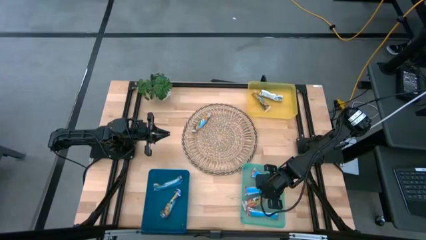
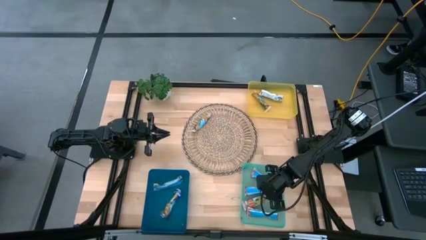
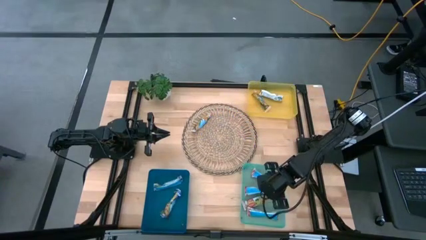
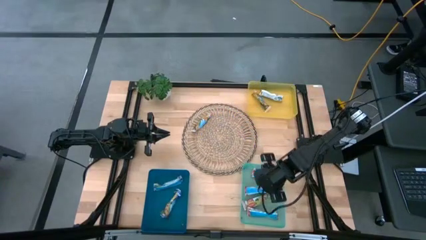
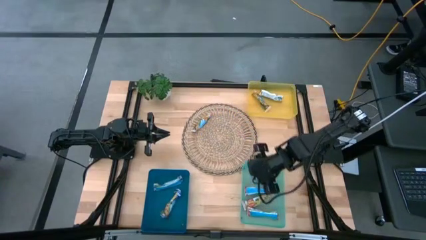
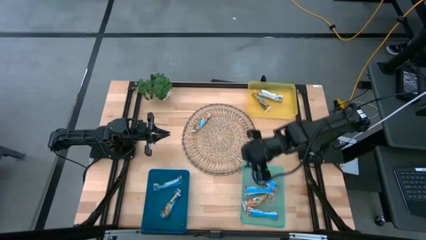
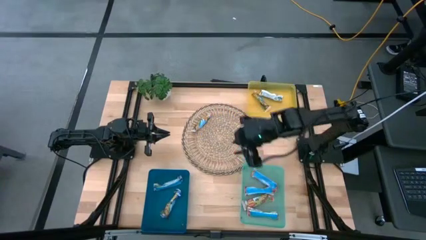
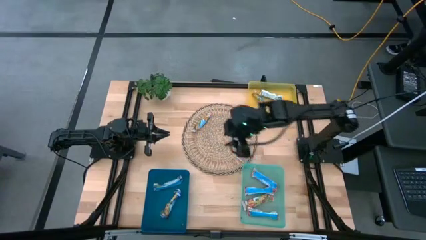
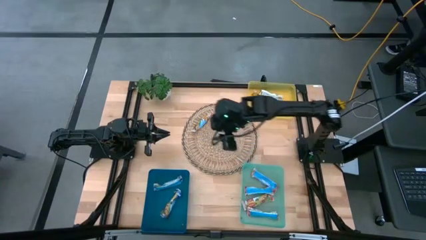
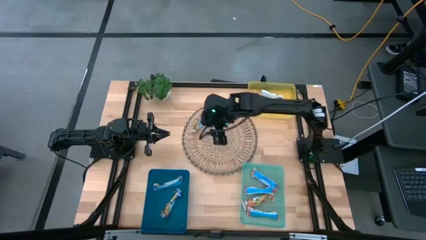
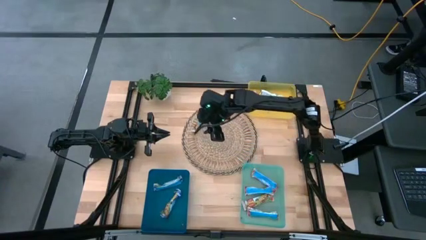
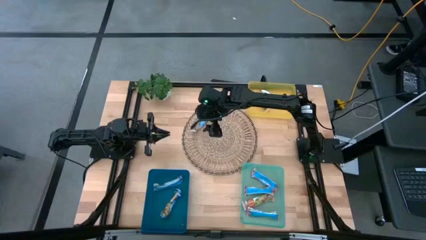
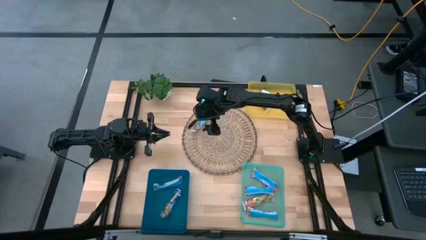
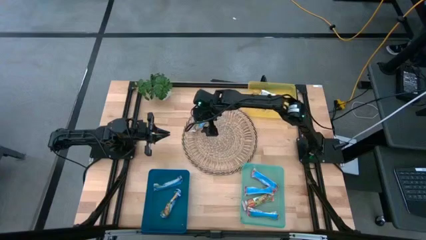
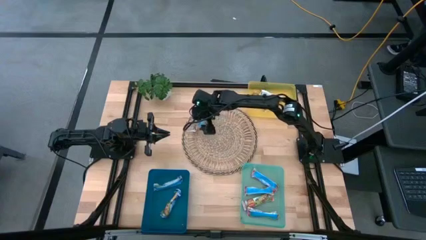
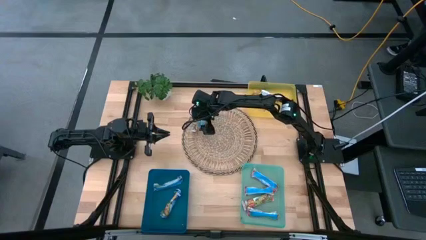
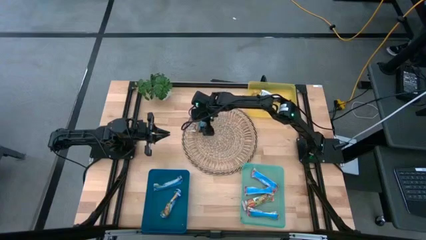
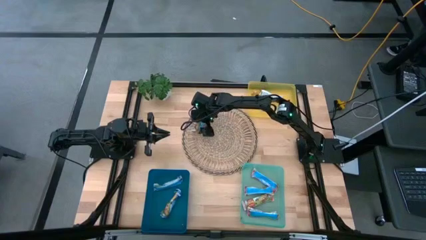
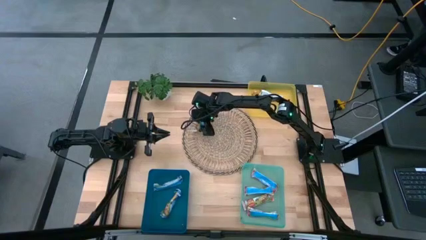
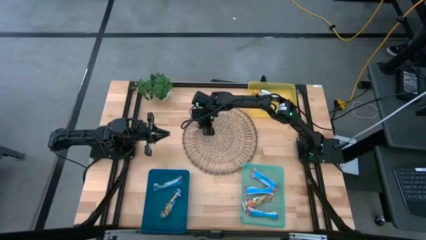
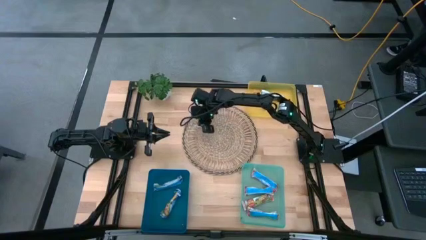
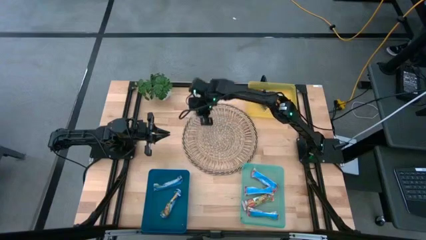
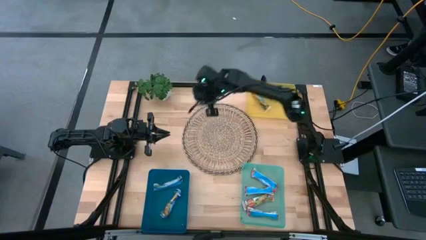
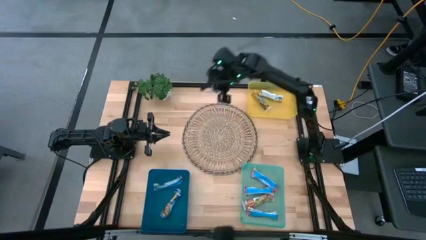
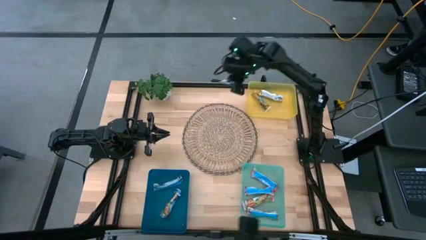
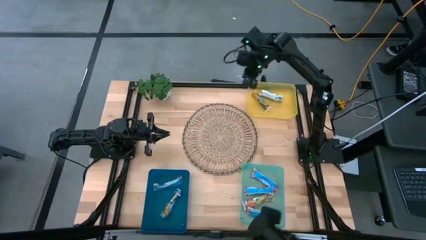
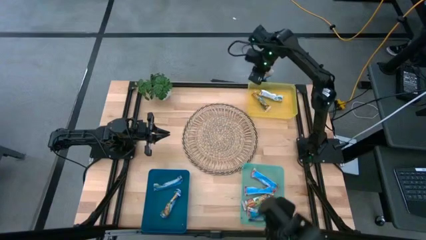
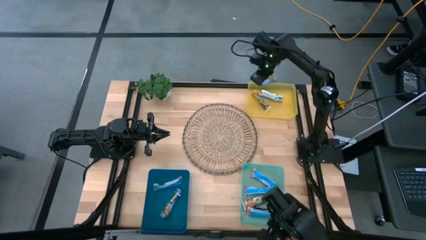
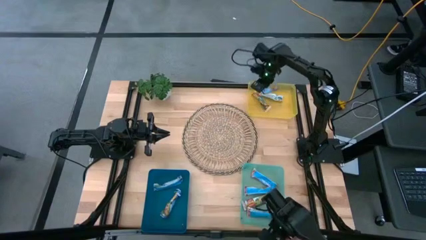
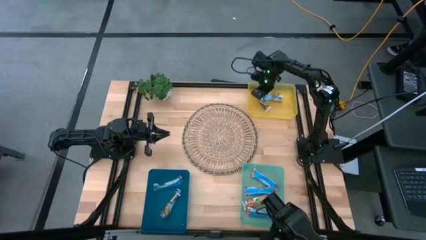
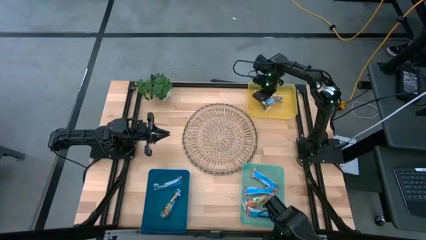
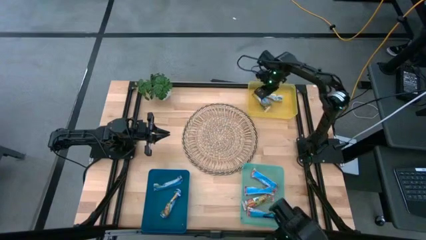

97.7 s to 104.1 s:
Task: Pick and place Granola Bars by type
Put the yellow granola bar into the yellow bin

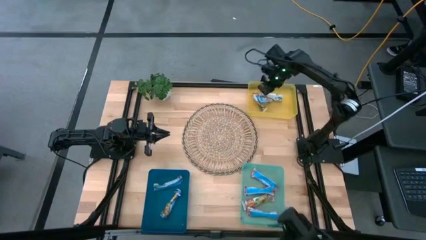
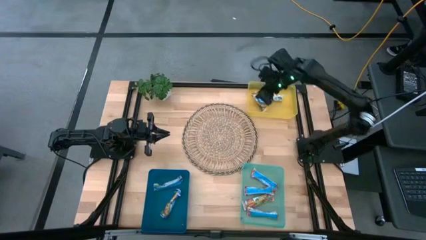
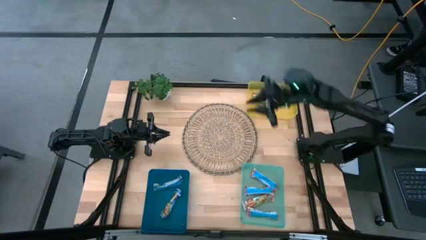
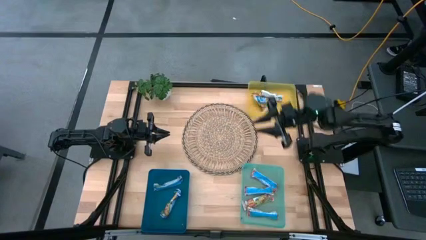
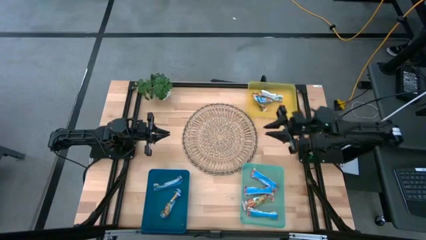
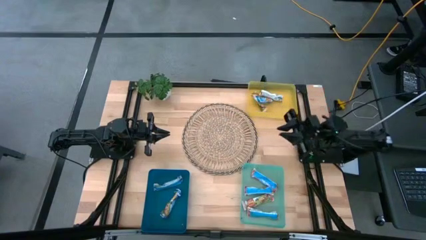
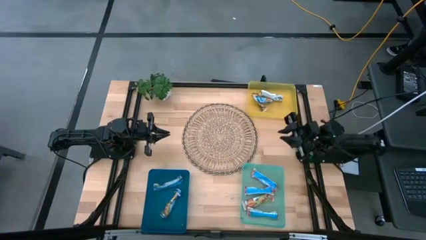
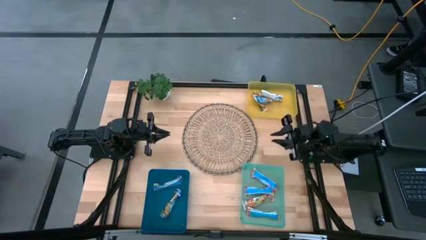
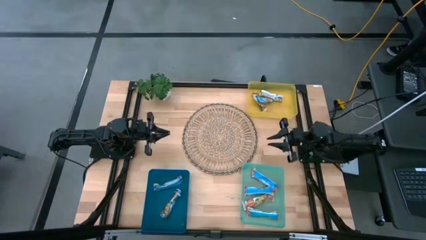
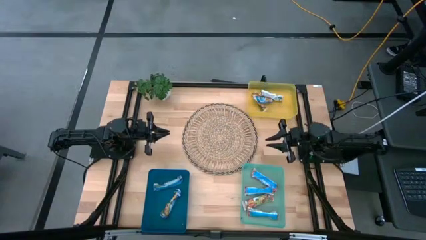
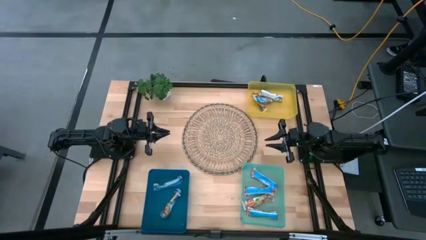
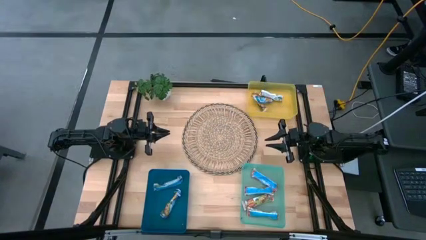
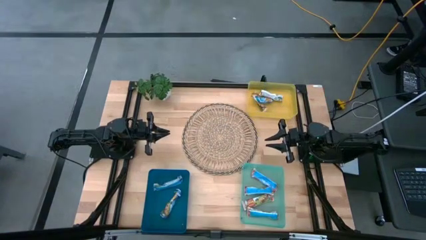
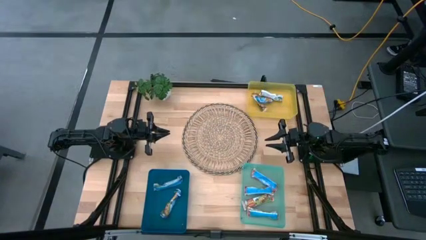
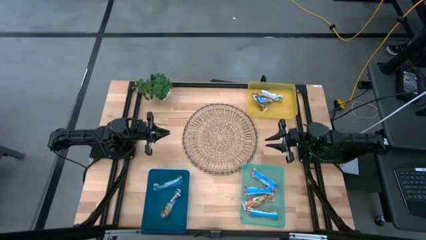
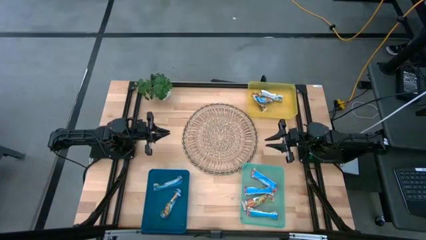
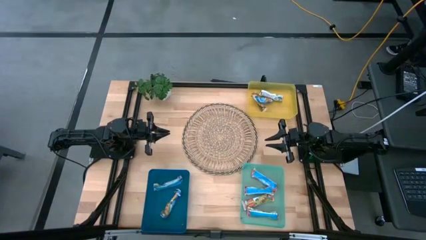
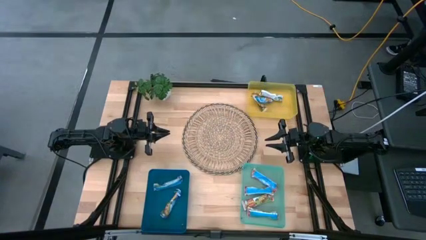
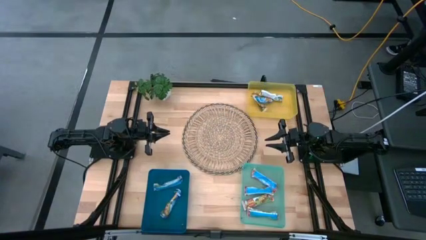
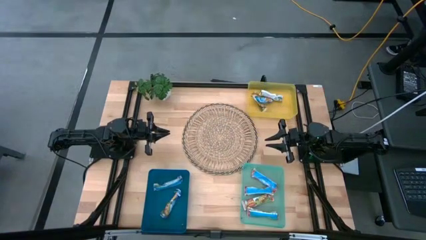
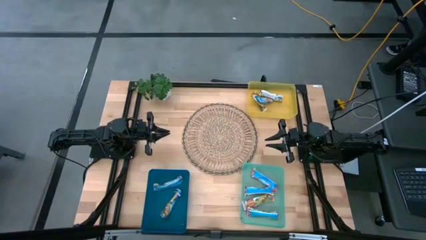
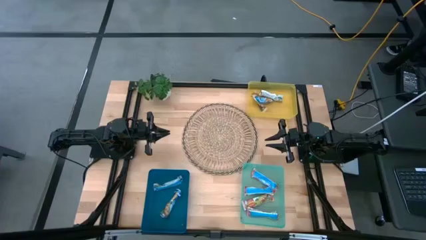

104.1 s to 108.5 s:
Return to Home Position
